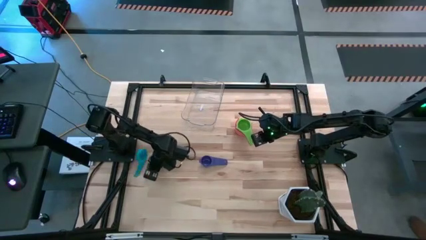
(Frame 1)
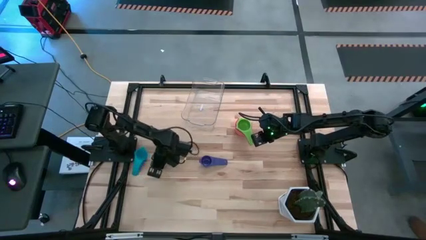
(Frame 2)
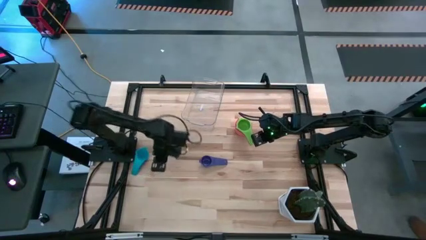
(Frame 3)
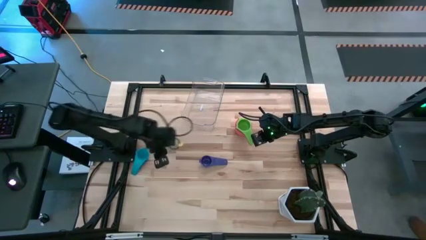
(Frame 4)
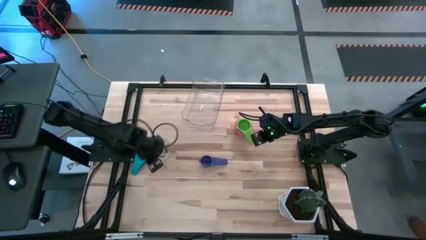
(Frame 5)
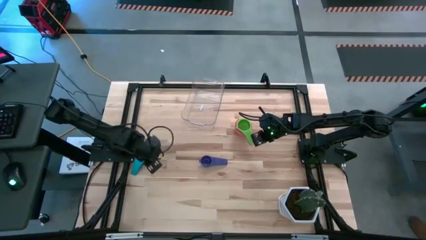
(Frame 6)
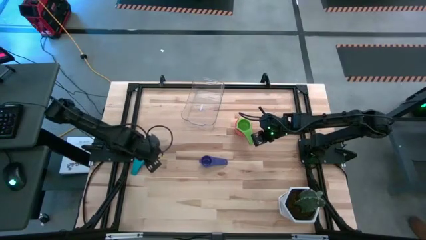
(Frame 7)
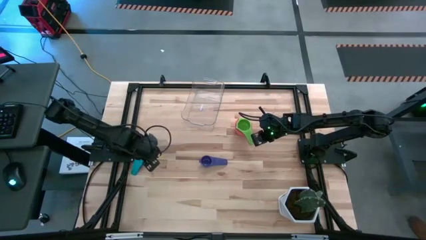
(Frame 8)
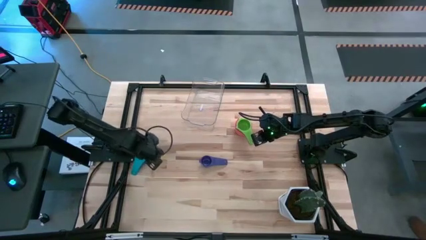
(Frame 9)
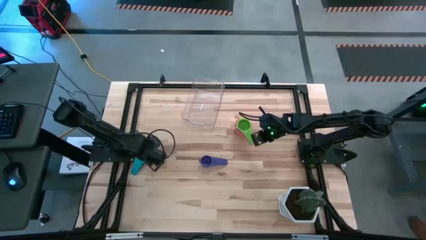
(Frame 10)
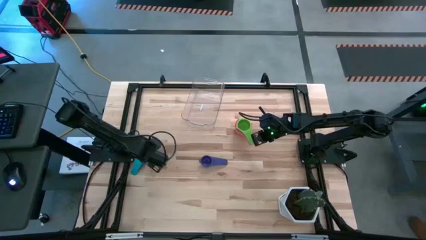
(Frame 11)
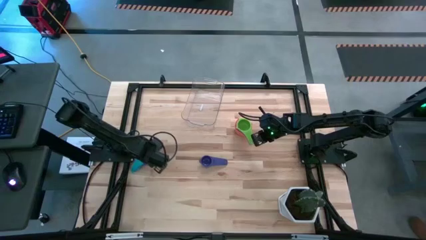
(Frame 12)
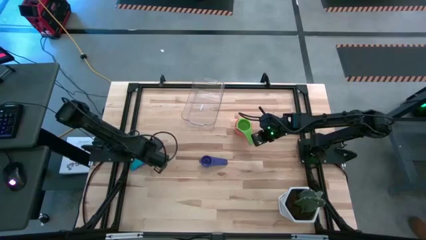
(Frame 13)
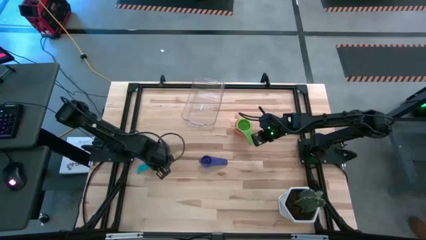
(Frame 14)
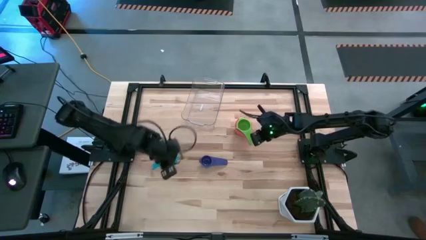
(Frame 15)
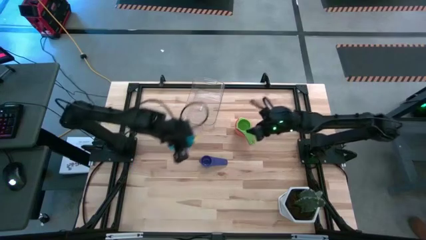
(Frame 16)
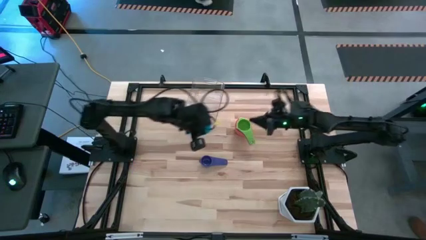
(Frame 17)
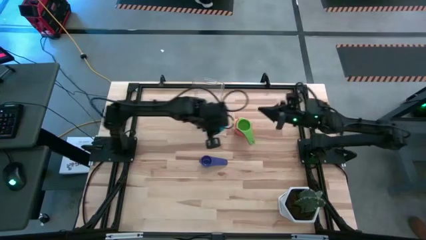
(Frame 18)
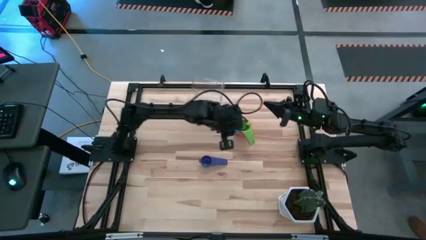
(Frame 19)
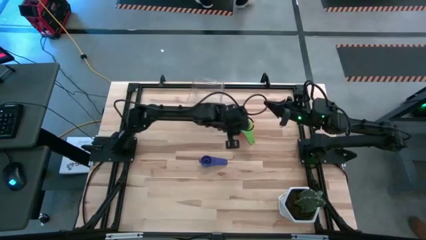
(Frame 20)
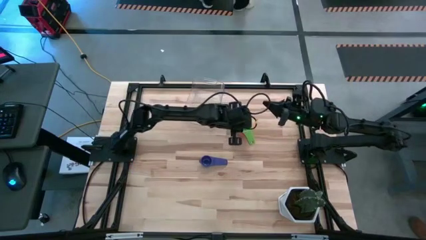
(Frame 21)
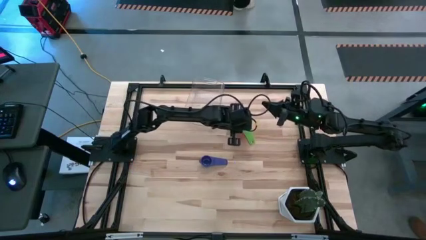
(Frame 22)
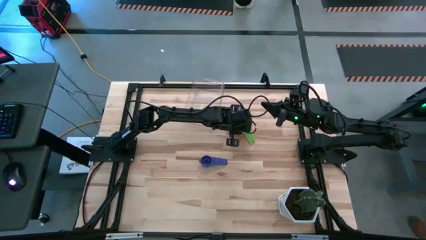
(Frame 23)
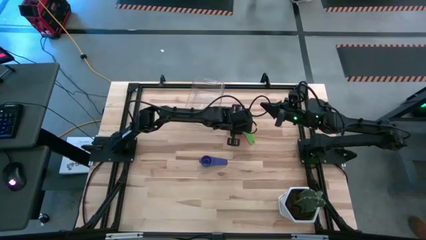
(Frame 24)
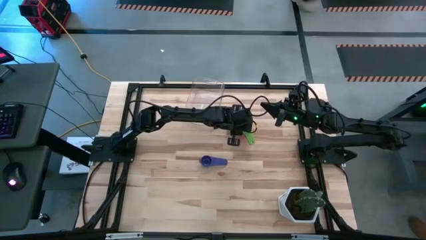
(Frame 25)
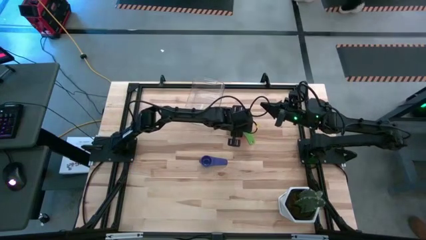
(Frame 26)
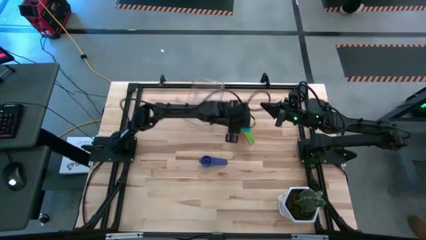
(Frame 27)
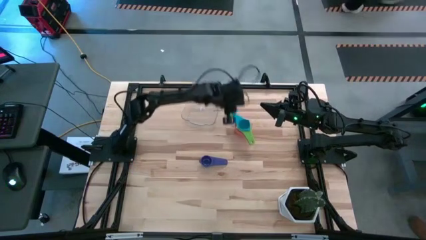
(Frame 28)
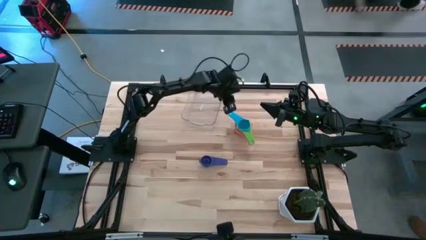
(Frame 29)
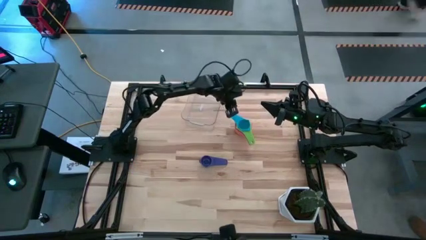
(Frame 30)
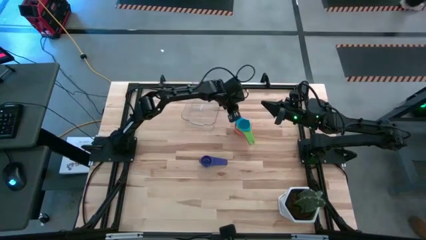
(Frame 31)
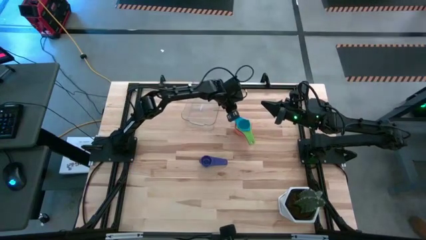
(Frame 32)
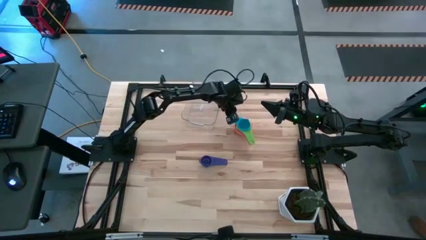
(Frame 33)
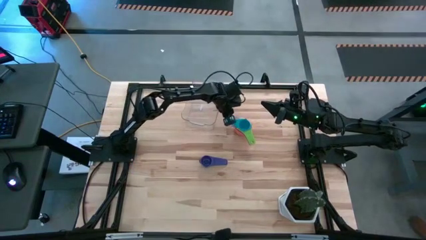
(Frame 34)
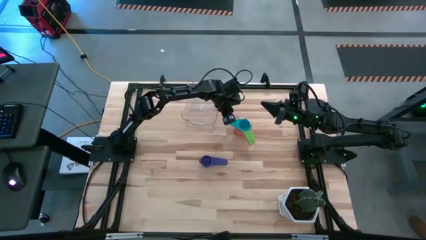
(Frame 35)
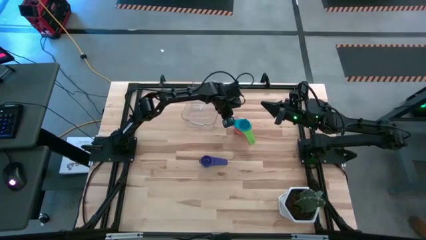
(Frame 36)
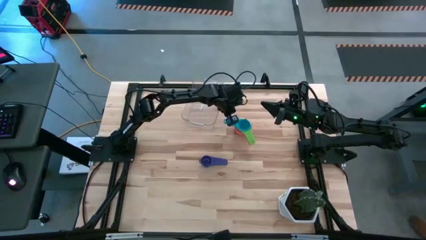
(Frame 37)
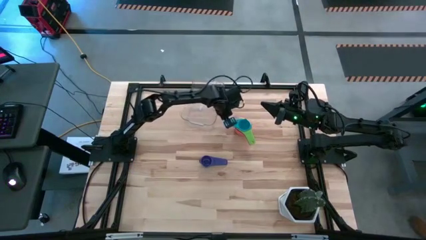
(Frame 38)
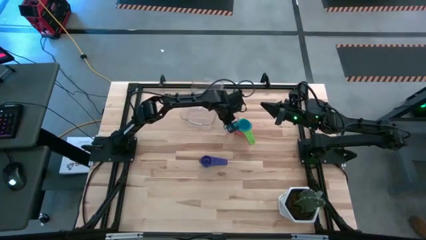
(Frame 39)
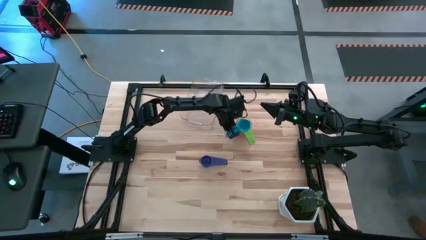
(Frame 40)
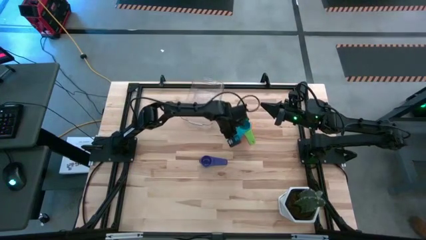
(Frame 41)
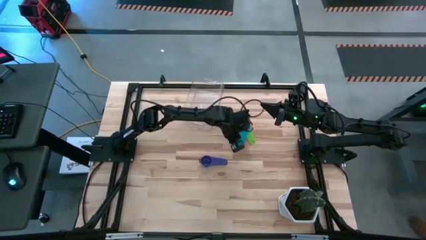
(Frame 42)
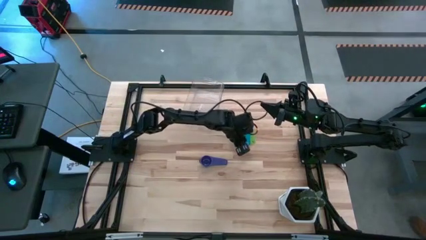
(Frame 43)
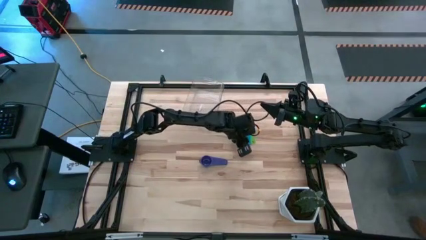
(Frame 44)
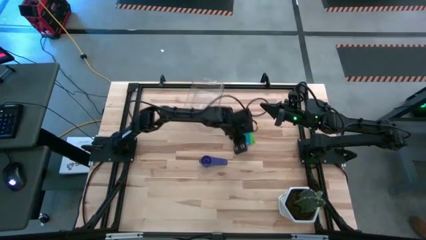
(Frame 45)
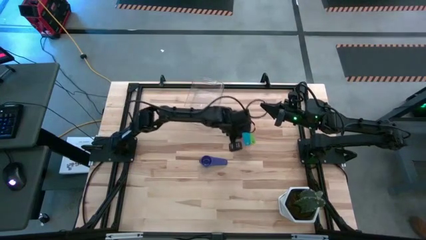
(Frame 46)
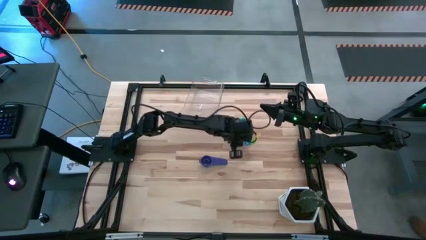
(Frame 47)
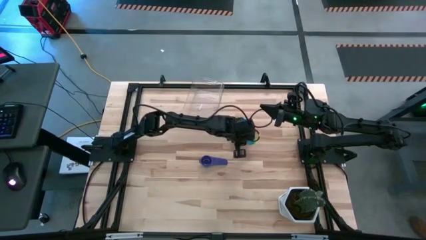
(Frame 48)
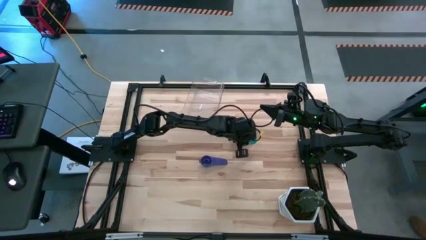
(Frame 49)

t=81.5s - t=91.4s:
Task: Nest measuring cups in basket
Put the light blue measuring cup on top of the green measuring cup

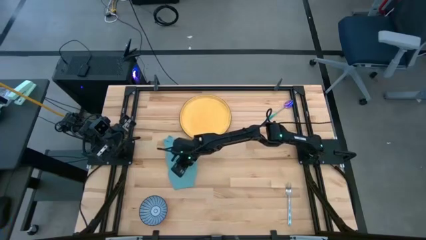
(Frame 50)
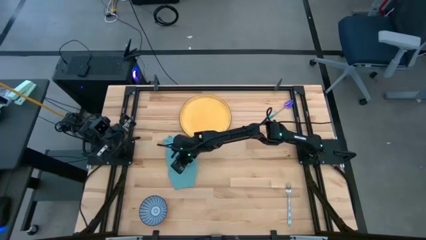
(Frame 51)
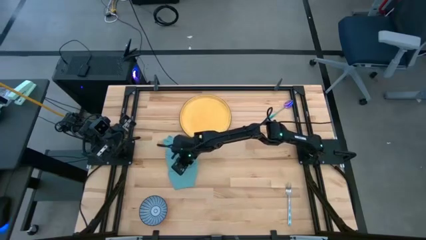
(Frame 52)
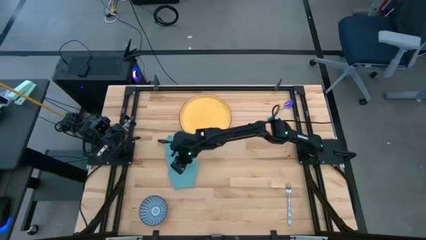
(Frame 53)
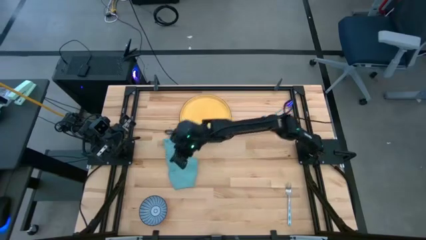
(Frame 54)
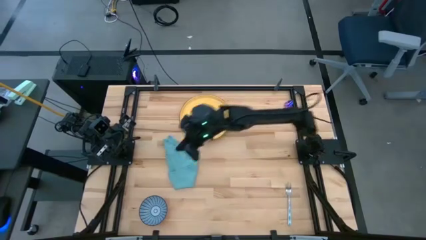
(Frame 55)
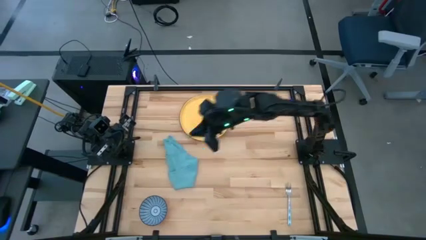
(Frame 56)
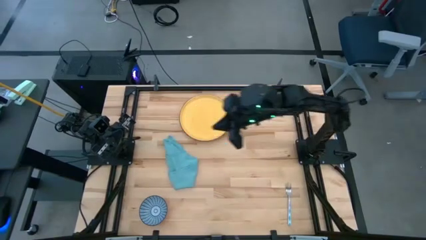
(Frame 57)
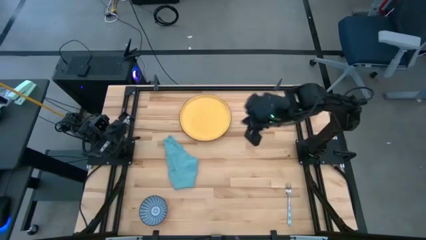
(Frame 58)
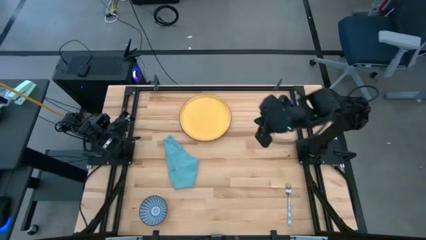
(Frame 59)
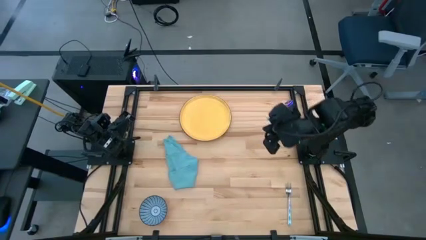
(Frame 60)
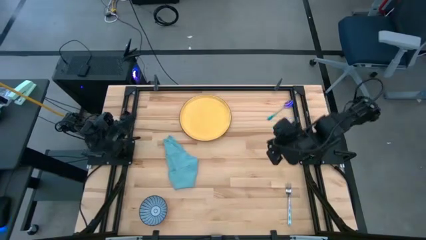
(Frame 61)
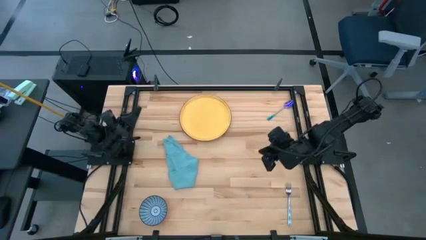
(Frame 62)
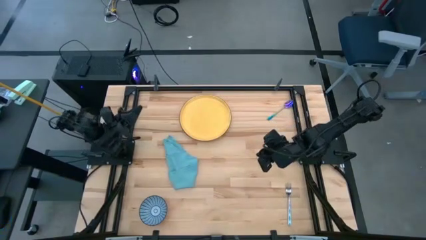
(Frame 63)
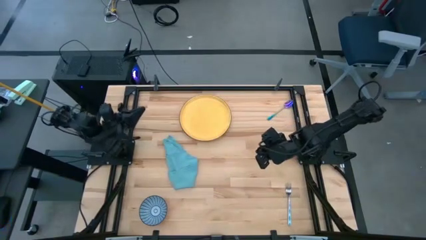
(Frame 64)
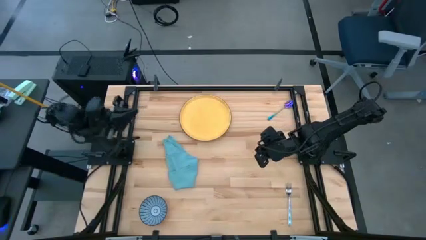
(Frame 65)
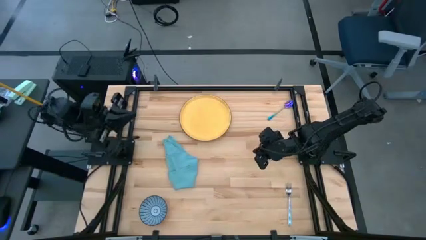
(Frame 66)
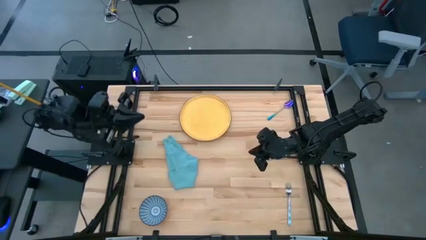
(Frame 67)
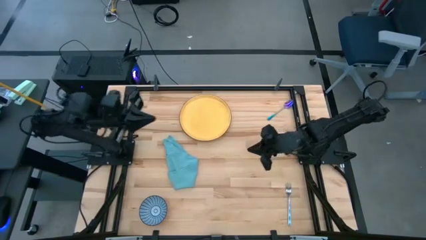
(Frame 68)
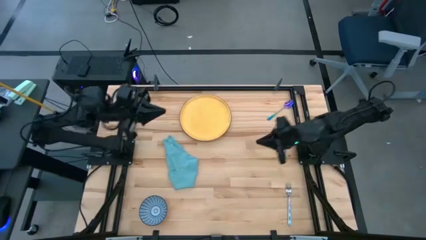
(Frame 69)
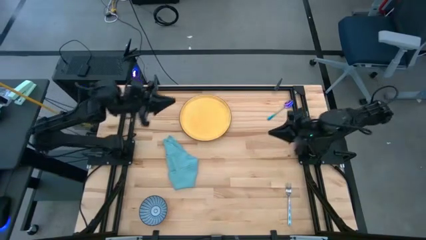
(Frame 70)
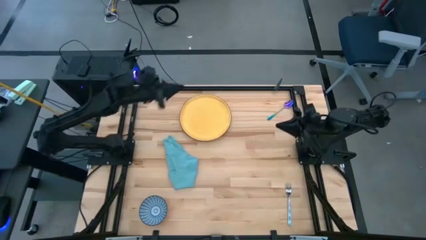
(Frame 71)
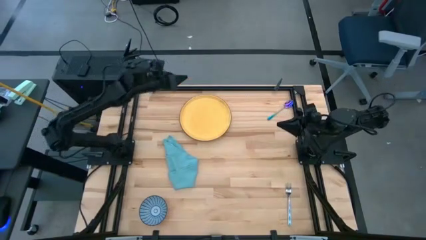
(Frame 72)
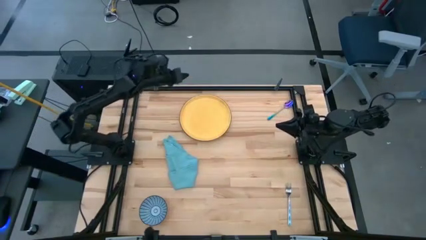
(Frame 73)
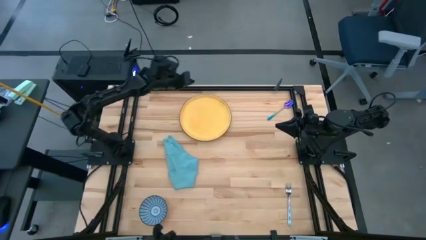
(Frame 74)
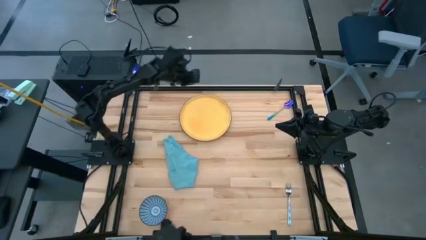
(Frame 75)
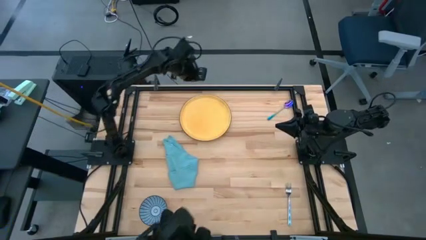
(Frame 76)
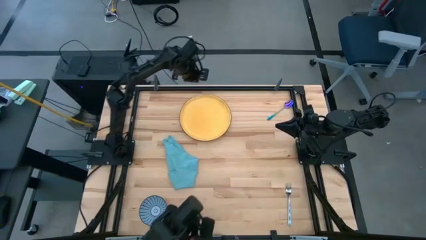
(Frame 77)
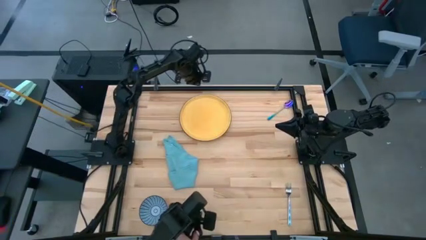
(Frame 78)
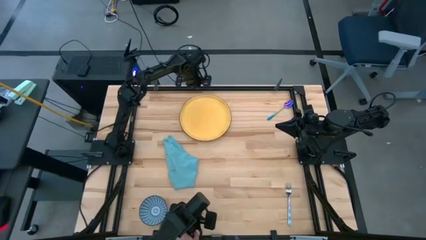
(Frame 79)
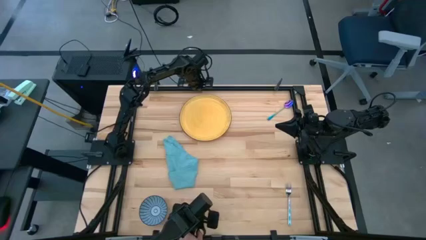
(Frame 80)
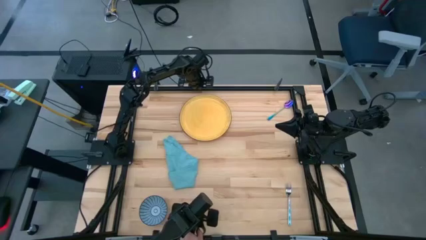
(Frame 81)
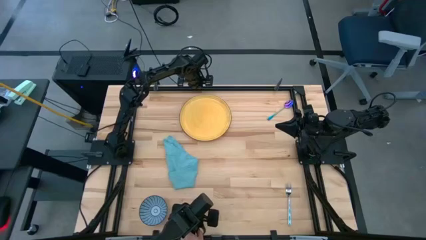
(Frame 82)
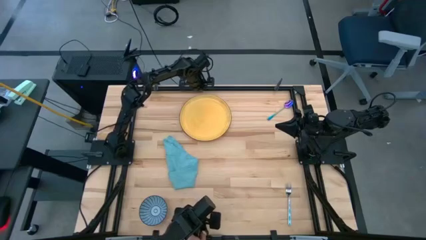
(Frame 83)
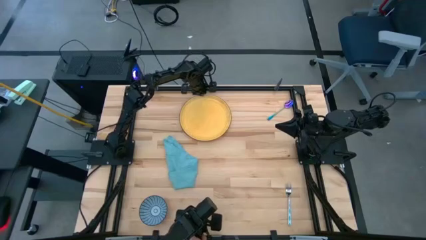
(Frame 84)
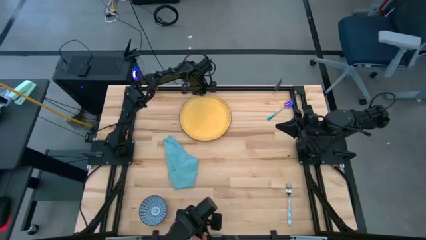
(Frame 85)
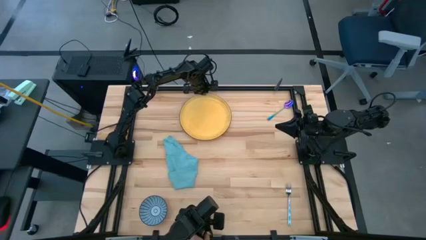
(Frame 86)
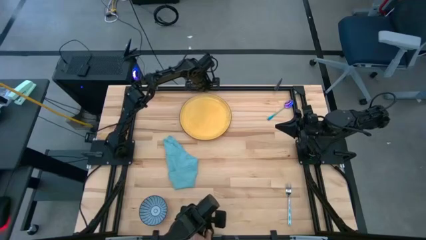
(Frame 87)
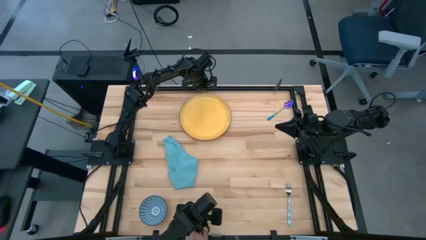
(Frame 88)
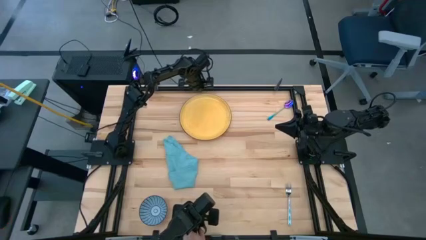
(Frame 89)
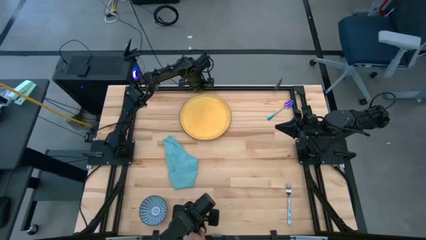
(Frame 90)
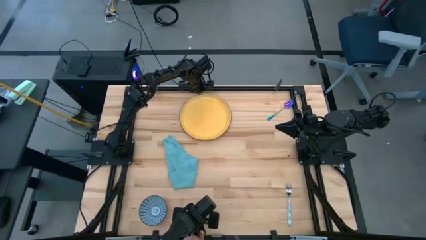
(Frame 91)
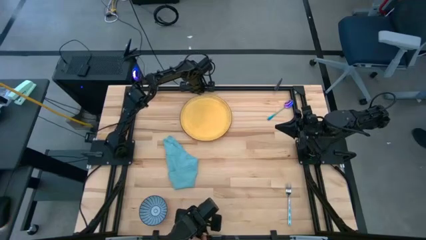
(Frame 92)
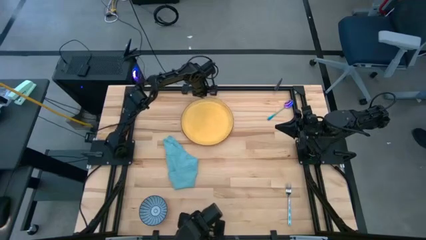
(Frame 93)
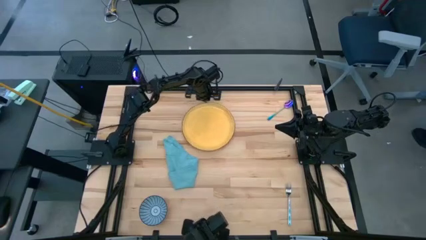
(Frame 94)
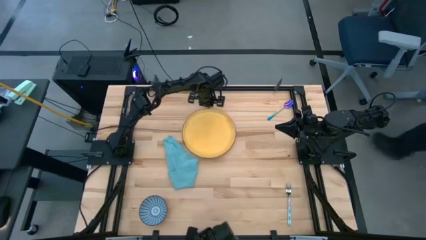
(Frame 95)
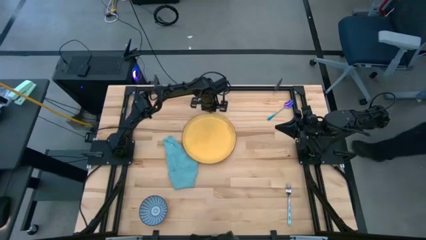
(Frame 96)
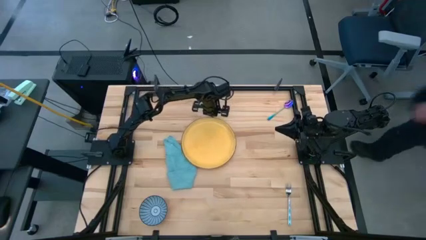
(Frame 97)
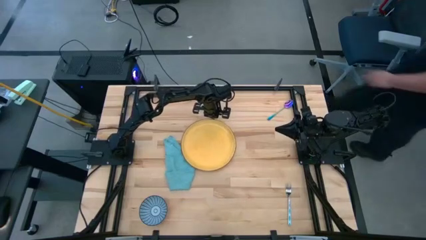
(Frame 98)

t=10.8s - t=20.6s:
Task: Set table place
Move the yellow plate to the middle of the table
